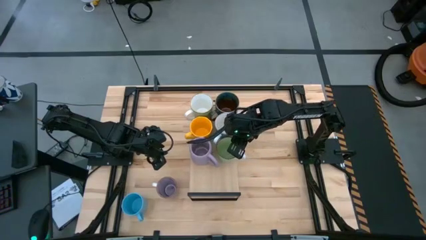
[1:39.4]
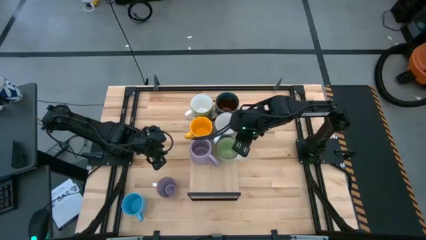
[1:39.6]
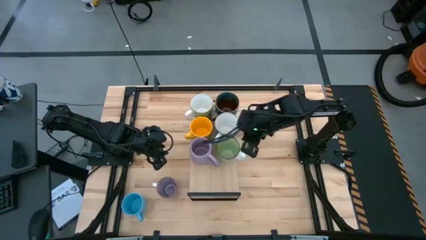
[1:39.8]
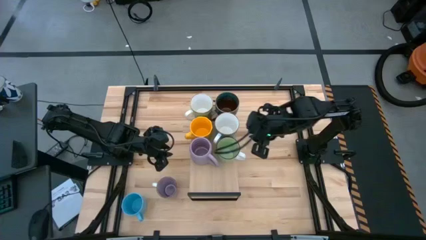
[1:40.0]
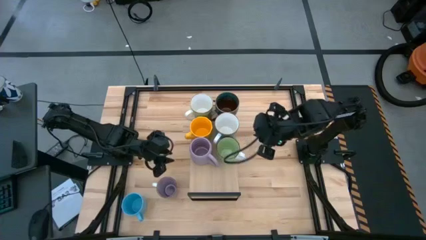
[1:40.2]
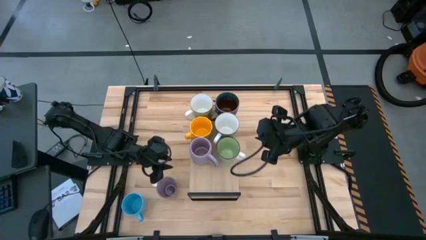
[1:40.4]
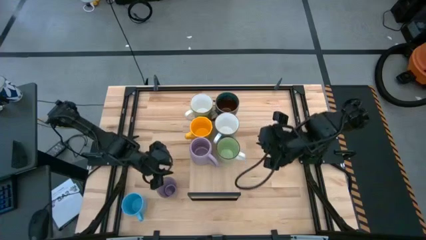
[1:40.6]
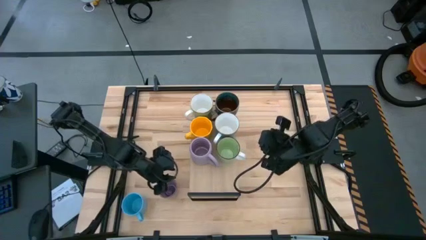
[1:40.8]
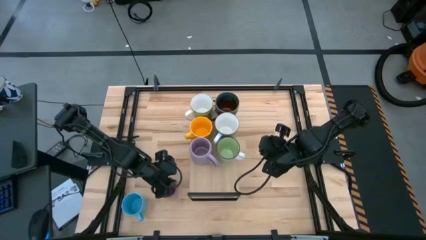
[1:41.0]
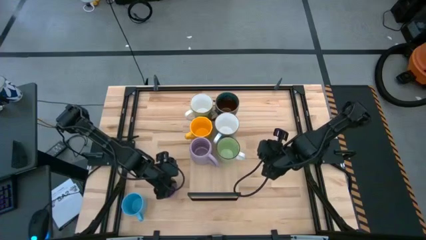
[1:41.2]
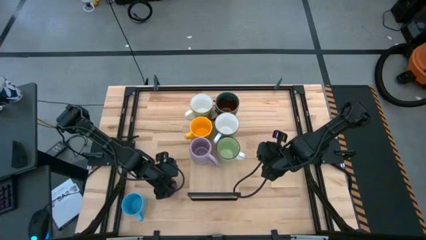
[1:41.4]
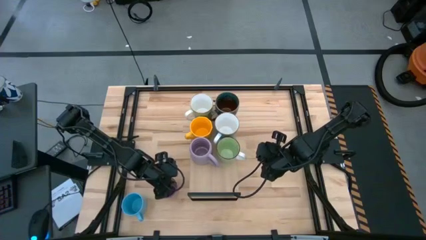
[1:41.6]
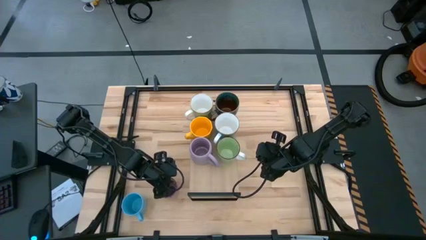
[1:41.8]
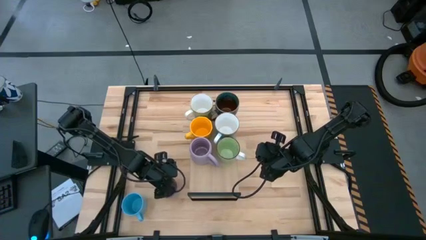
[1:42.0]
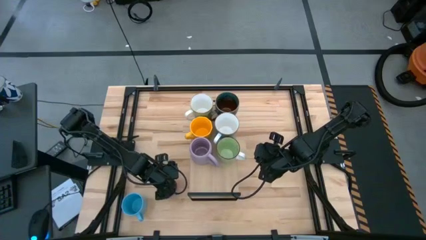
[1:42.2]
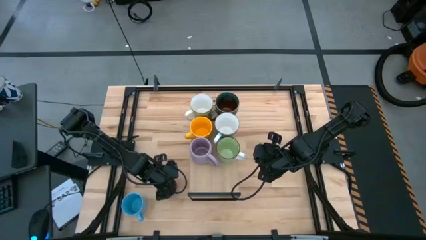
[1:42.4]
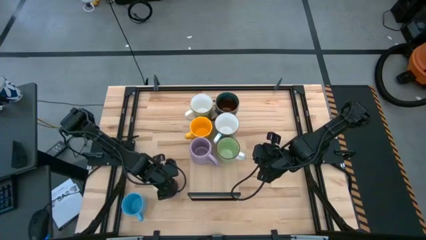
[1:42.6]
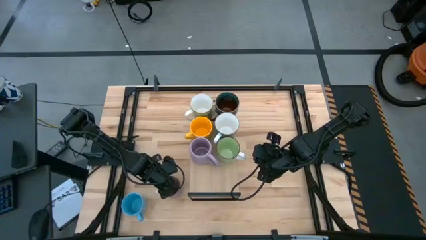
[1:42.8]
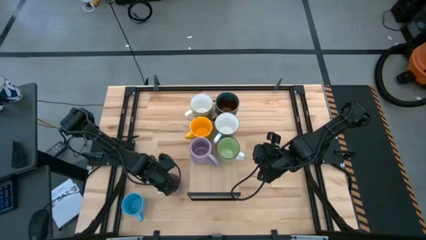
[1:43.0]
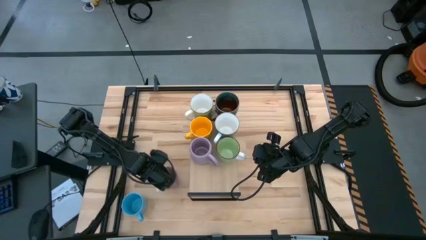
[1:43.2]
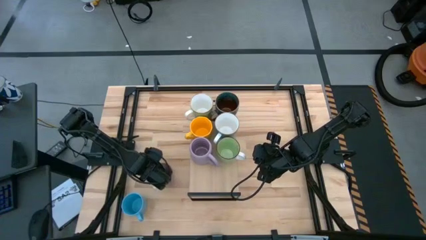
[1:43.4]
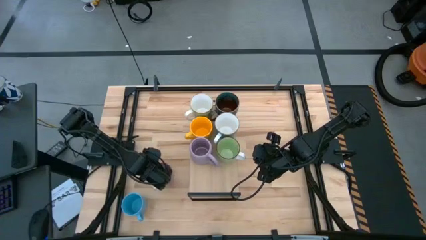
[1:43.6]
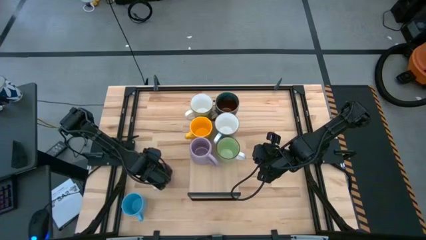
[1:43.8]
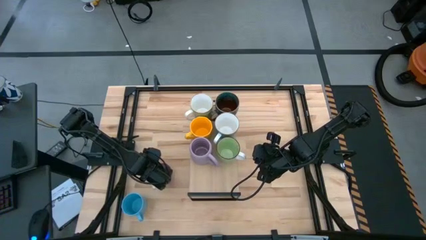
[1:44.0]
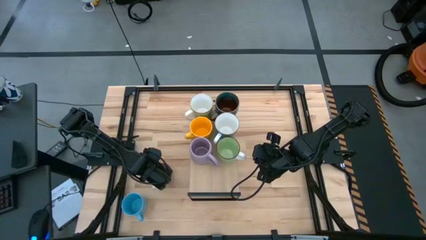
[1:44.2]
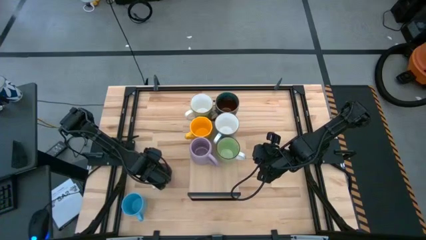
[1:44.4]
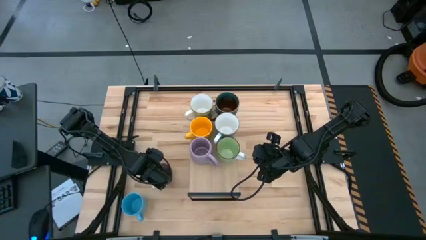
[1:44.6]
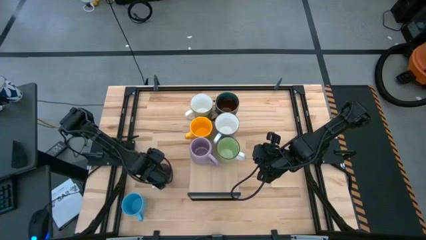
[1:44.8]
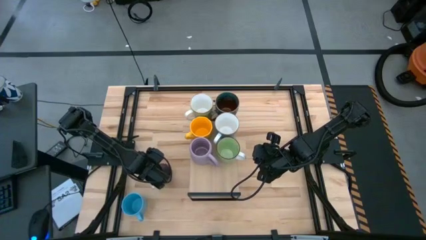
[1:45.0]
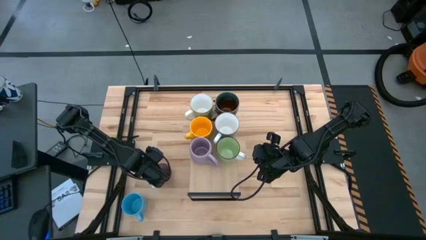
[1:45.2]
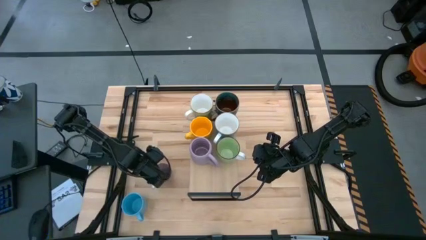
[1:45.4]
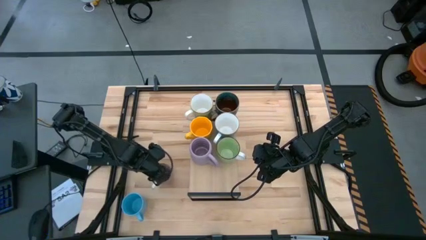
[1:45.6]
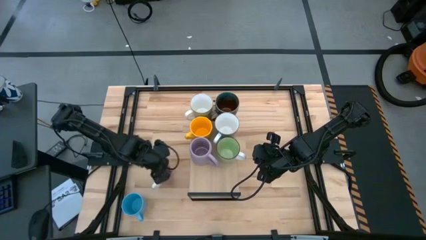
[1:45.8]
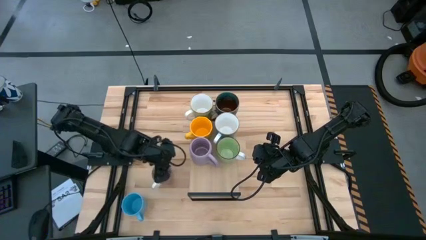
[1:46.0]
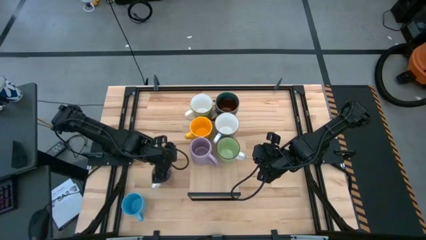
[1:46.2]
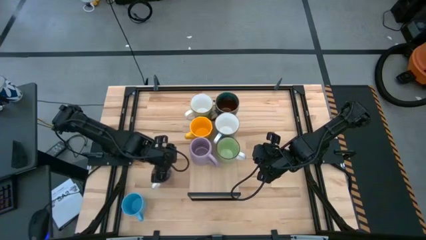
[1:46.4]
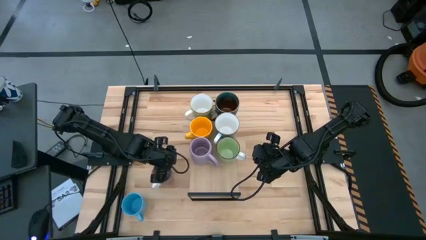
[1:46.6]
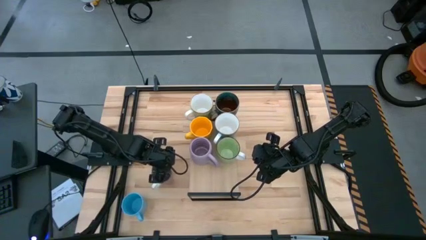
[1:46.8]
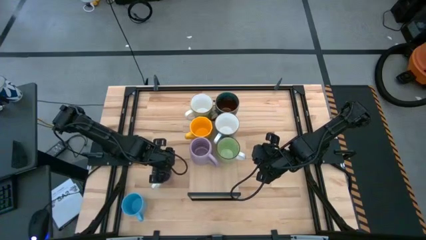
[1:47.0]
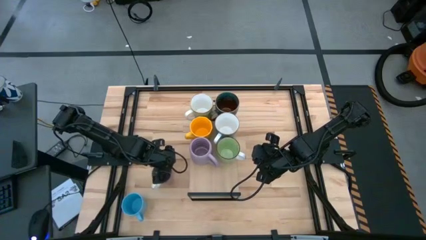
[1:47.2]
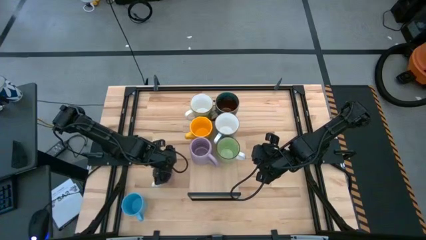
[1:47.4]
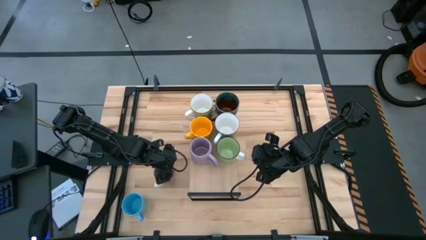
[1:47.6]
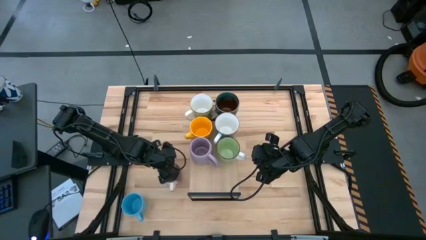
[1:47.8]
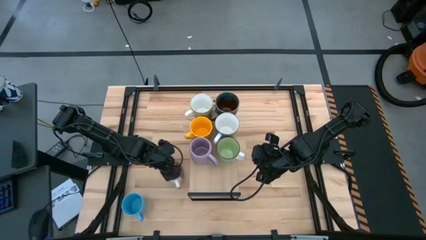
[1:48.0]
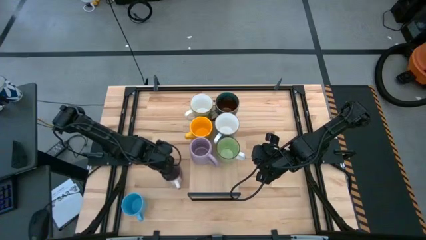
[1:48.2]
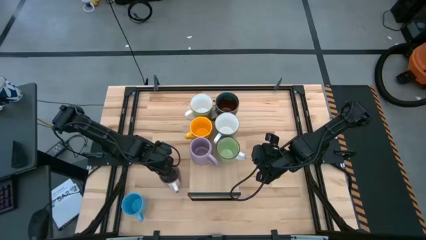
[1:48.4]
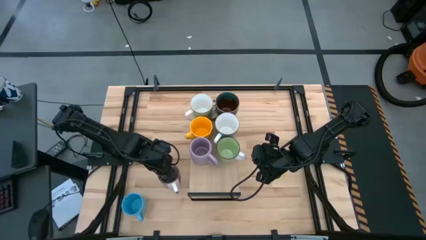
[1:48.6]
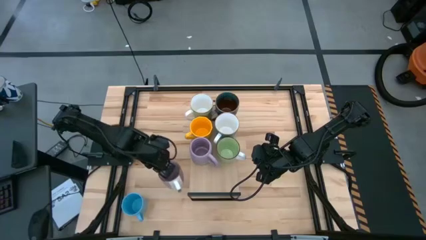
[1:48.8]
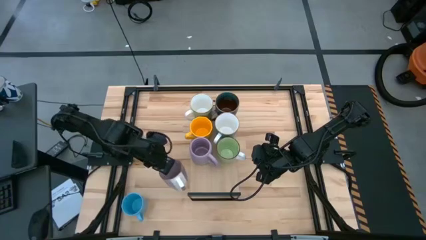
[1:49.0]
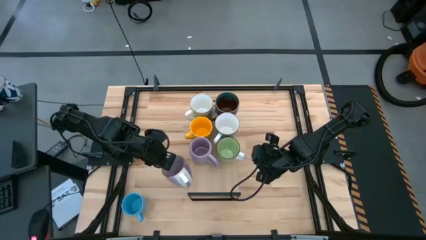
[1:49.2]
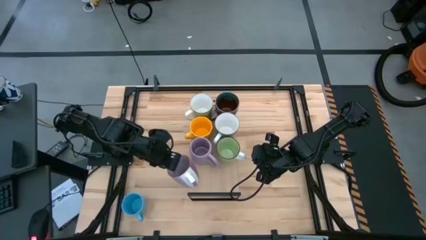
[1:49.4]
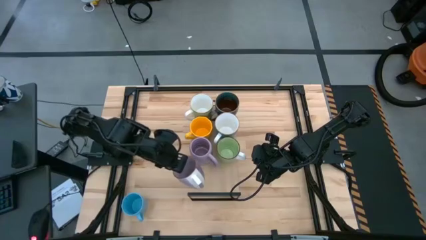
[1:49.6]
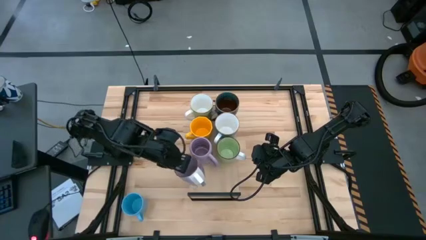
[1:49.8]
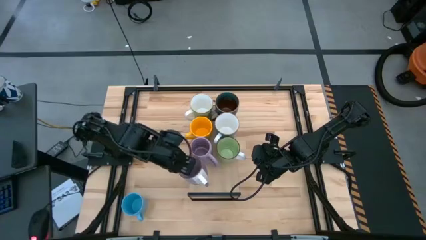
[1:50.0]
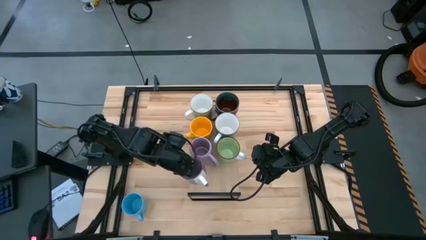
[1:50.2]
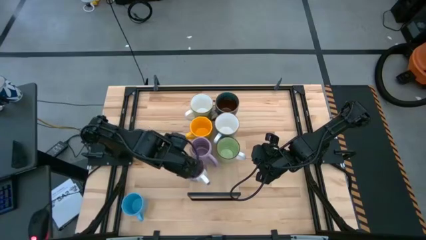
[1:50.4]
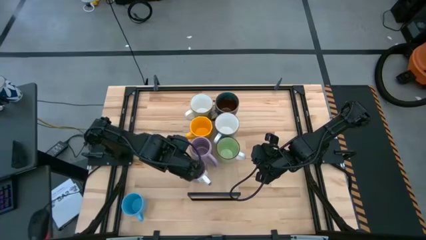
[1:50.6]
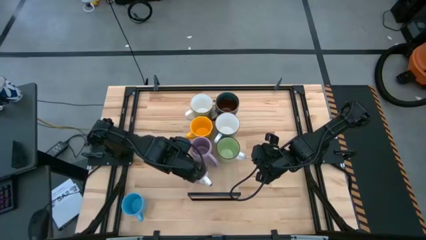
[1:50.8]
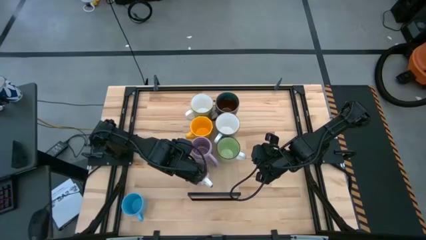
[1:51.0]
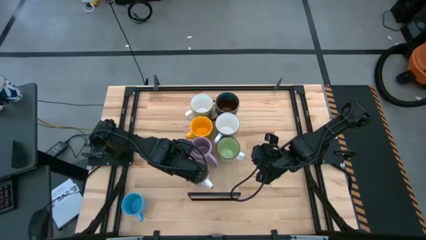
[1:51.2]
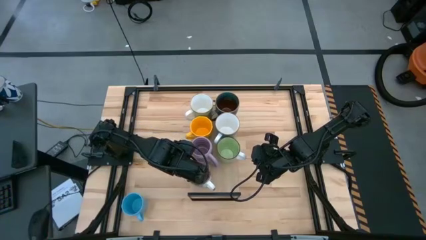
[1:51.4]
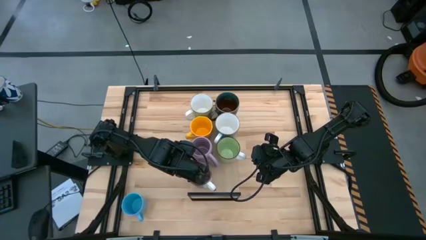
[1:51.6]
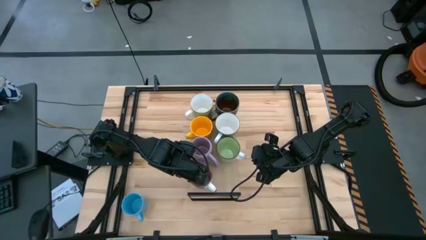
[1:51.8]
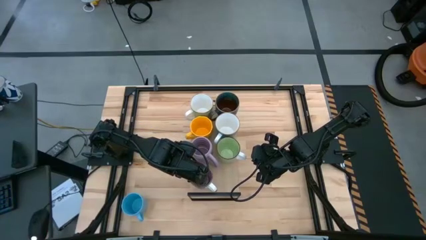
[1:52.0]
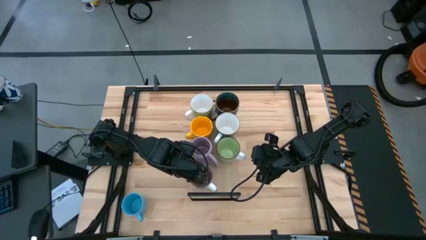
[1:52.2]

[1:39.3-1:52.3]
Task: Place coffee mugs
Put the purple mug on the shelf aligned with the other purple mug

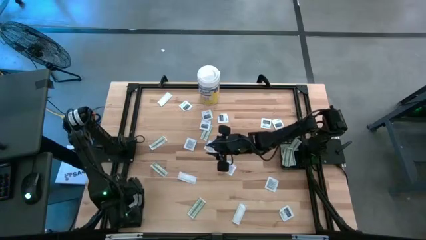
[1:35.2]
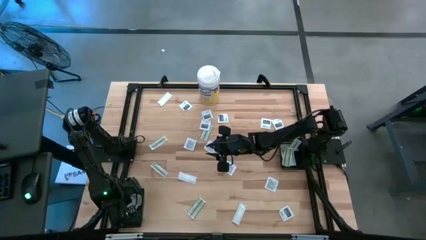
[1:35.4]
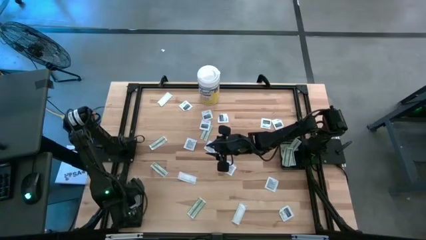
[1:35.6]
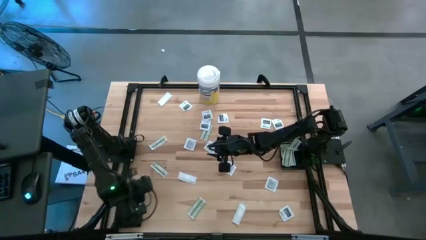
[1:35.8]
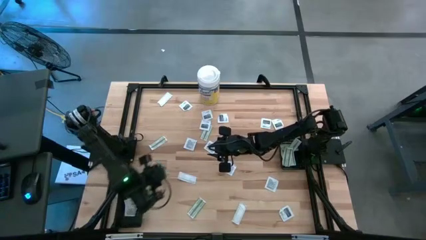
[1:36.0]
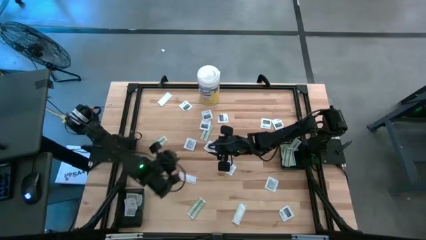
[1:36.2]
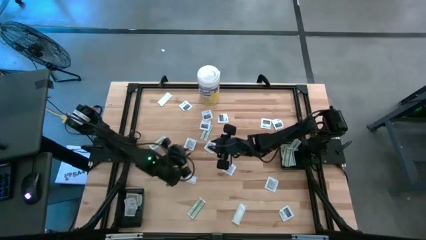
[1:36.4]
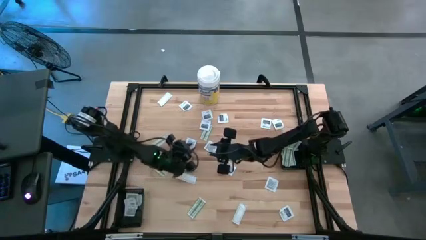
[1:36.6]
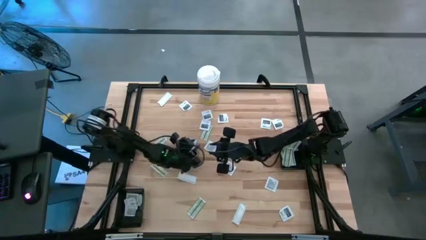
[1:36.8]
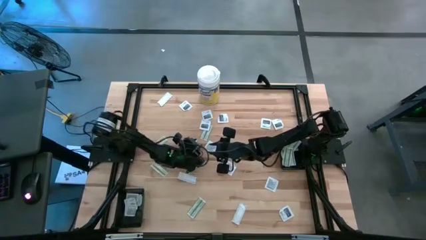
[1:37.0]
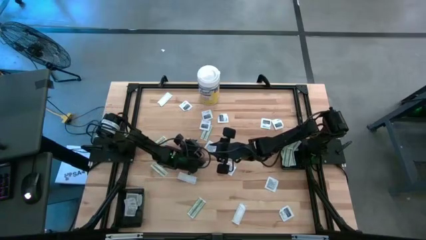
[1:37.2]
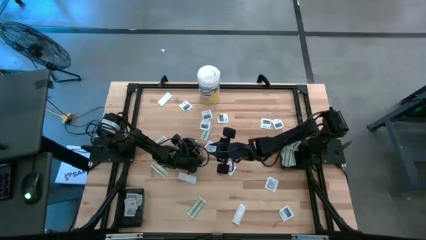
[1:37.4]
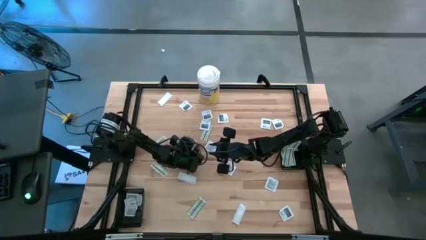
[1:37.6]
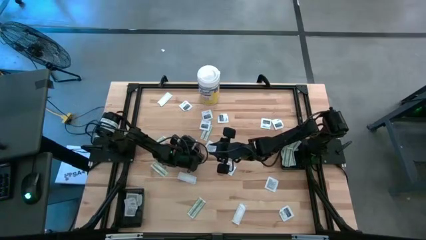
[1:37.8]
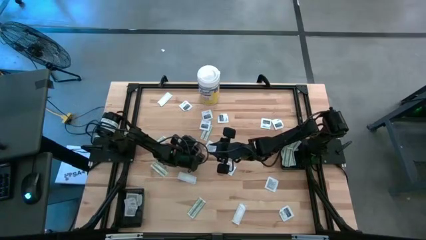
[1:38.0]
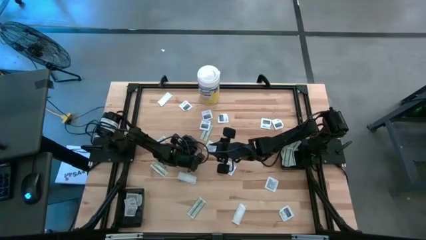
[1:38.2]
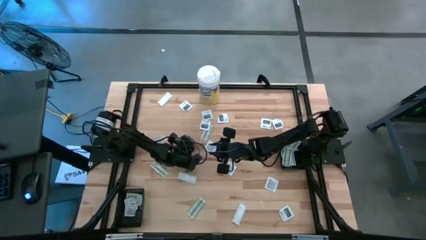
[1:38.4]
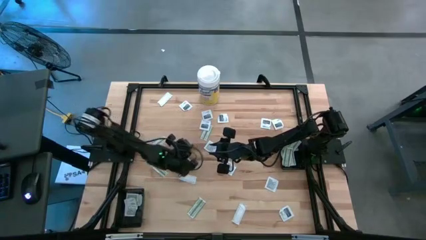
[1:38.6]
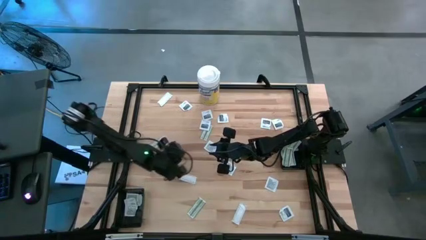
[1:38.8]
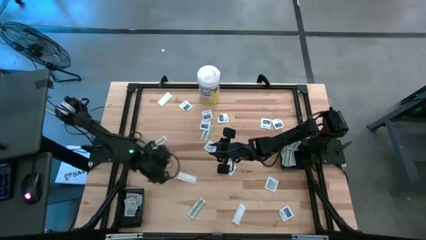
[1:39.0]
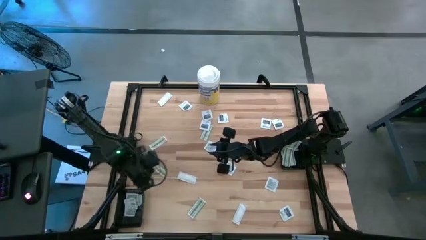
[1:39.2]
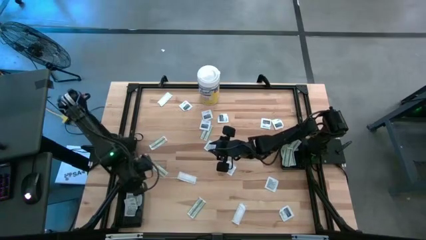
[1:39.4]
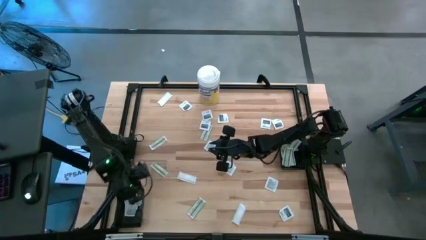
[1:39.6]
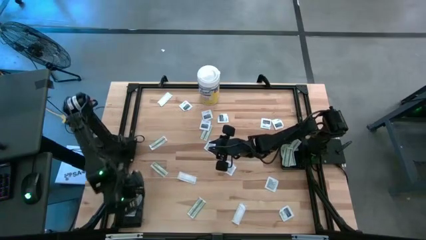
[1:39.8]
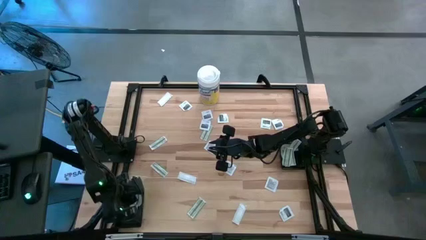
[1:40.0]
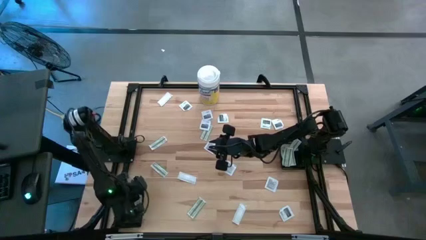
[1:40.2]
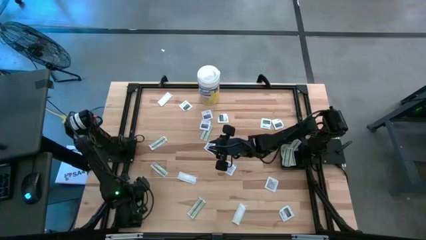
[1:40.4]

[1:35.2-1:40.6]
Task: Pick & Place First Aid Supplies
Put the white towelette sachet into the left black bin
